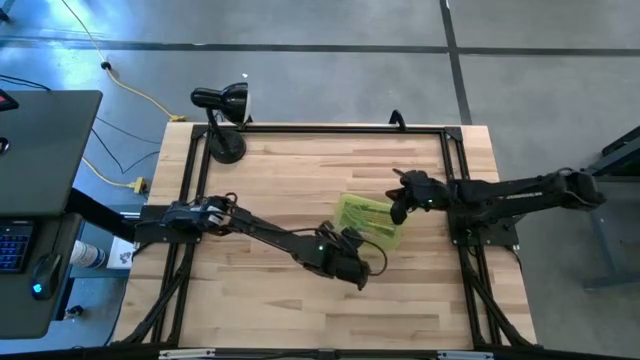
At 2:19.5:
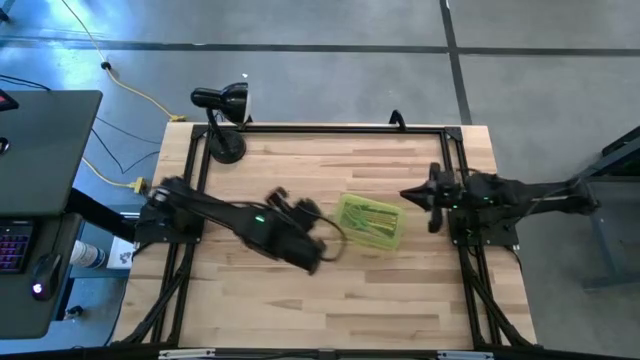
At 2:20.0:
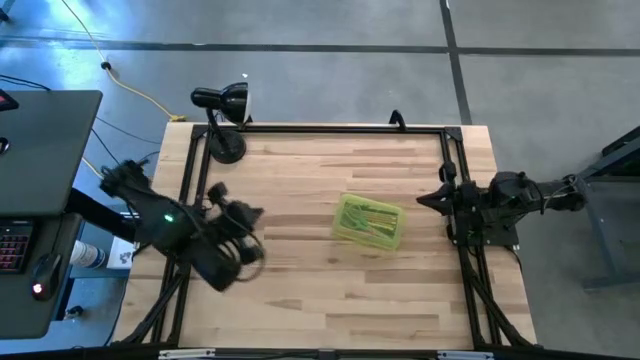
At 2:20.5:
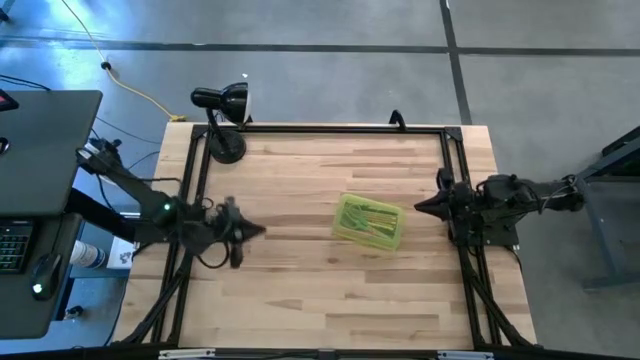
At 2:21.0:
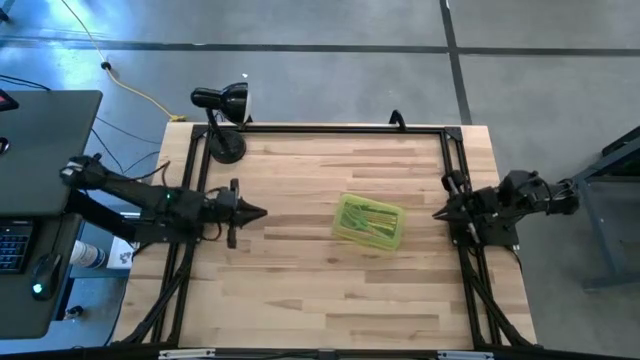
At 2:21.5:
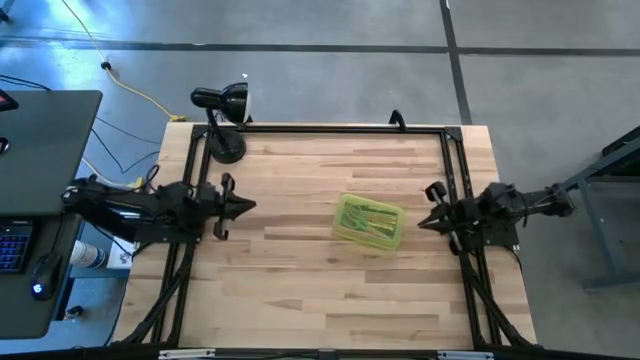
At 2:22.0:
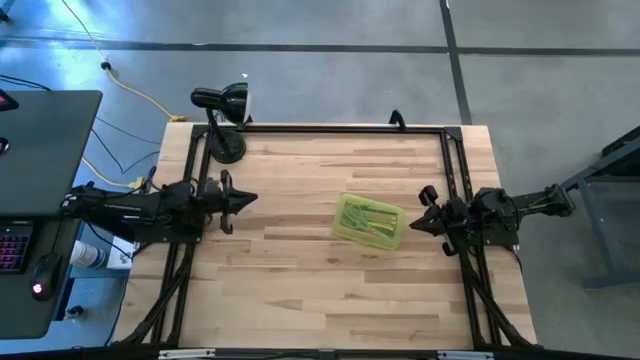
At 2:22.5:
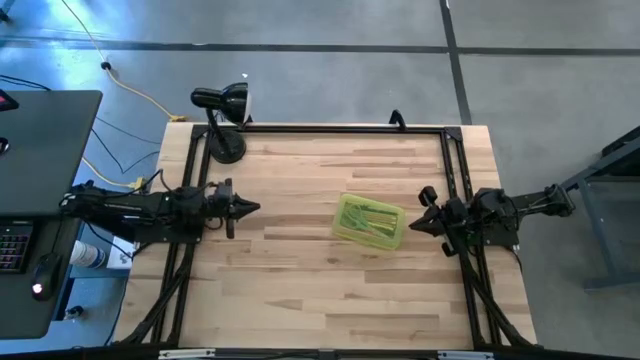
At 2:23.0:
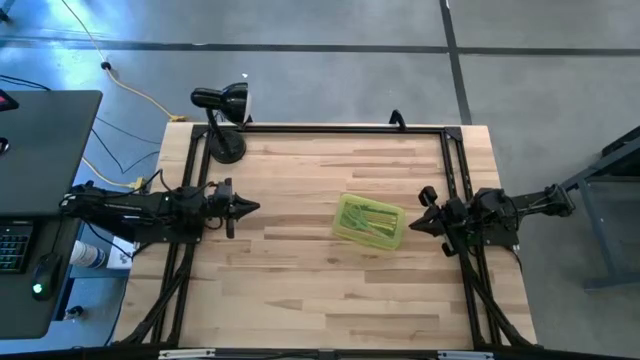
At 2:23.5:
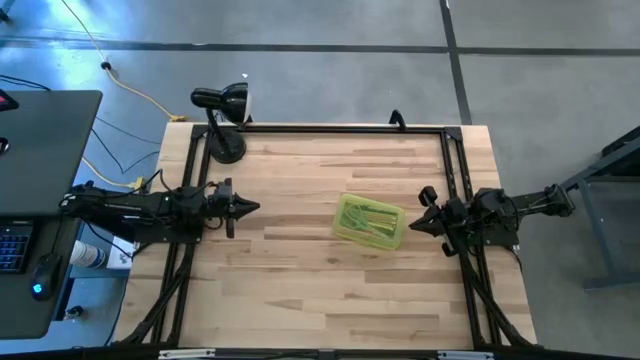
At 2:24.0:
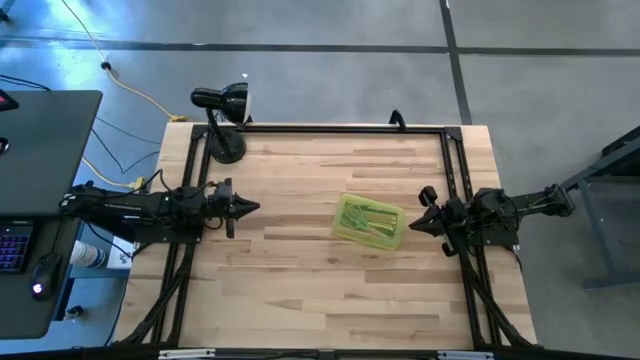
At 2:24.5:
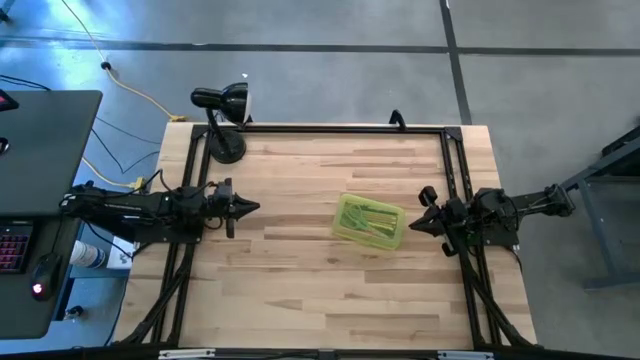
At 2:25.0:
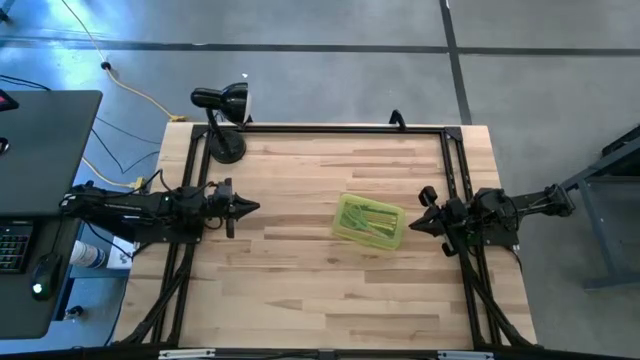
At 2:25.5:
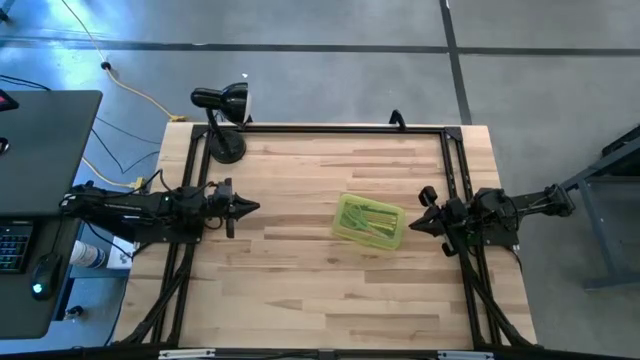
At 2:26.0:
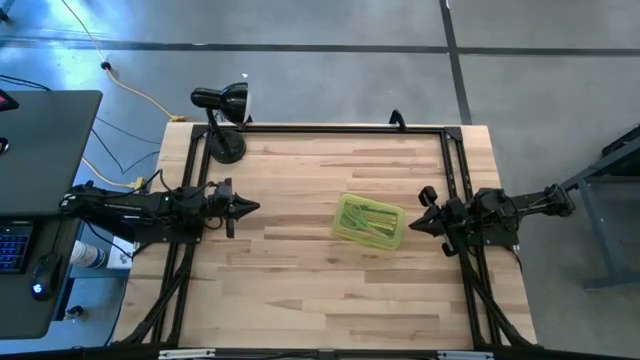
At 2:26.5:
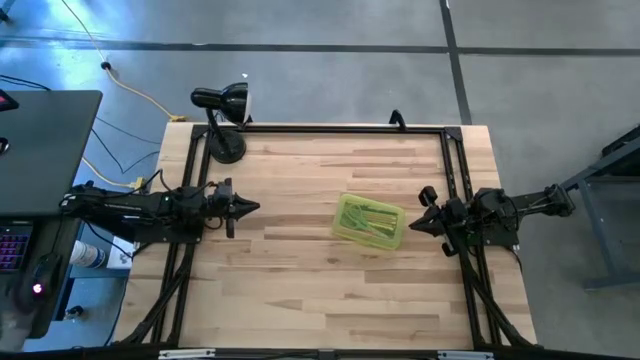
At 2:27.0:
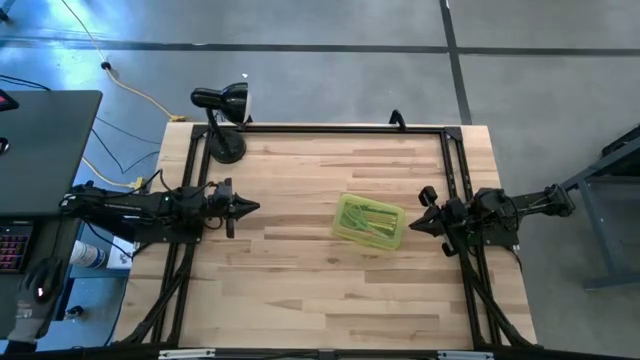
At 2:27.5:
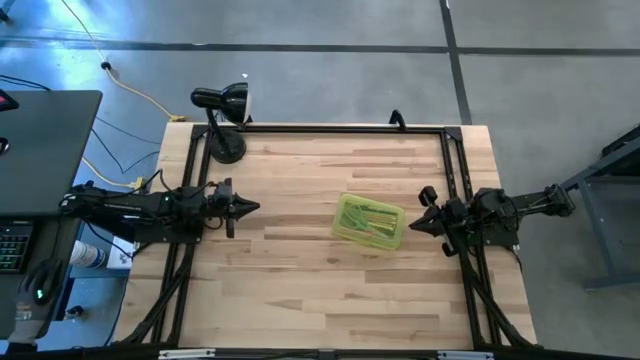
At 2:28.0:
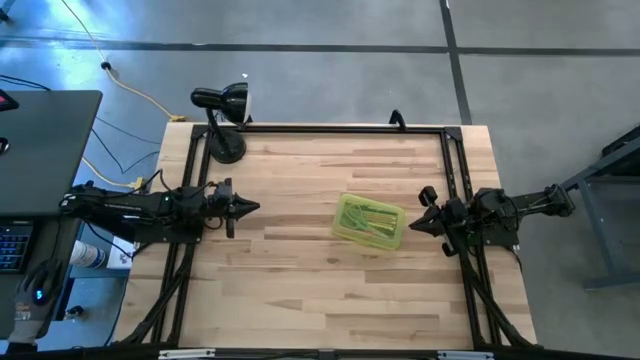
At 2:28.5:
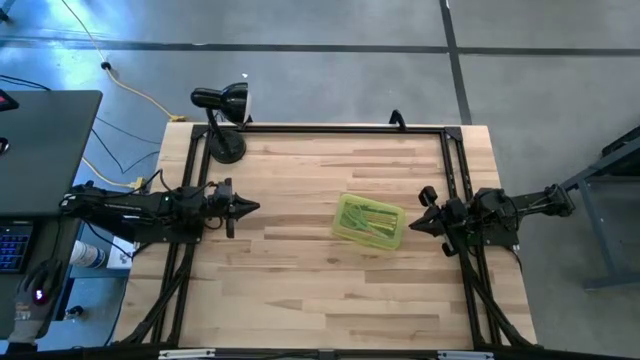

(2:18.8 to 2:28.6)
Task: Pick & place school supplies into a supply box
Return to Home Position

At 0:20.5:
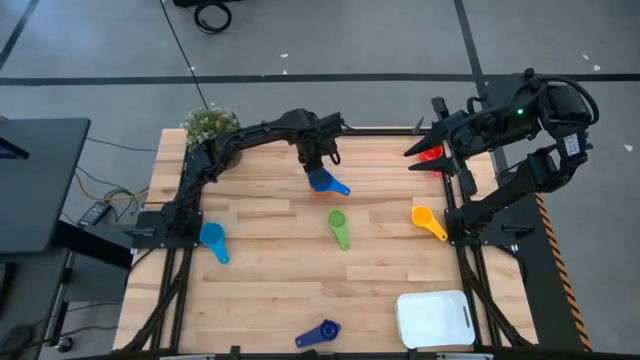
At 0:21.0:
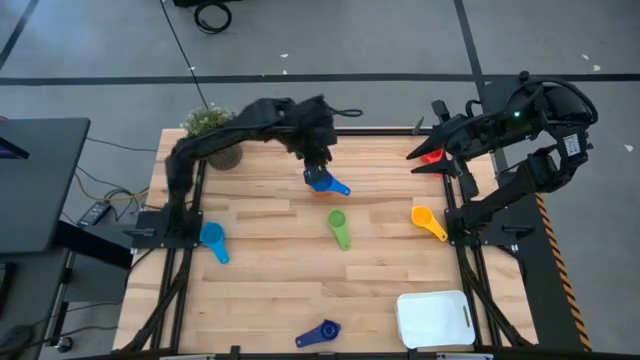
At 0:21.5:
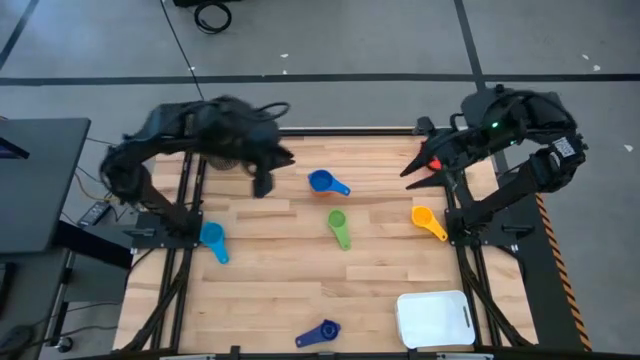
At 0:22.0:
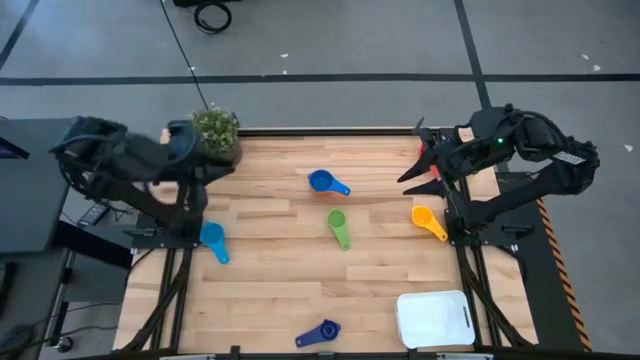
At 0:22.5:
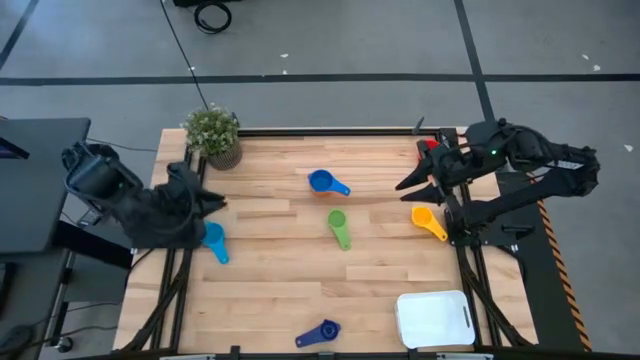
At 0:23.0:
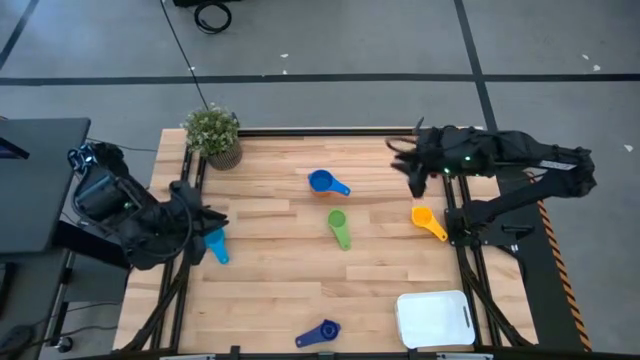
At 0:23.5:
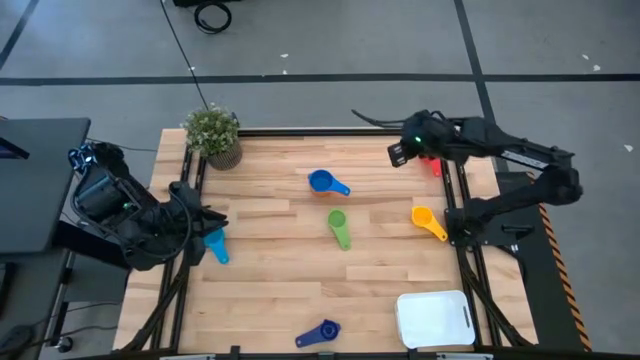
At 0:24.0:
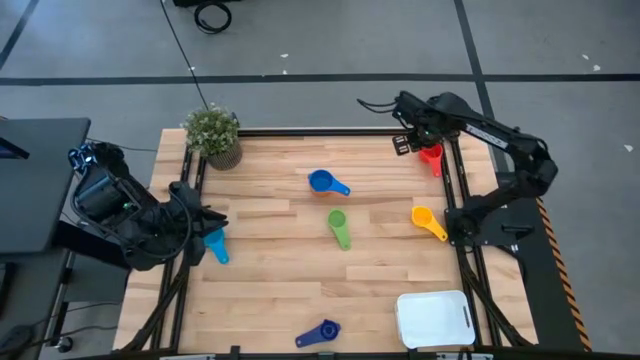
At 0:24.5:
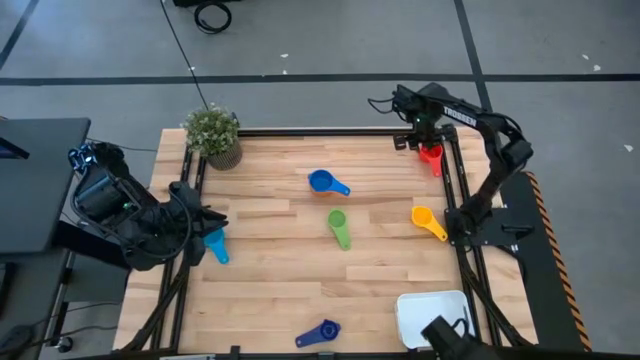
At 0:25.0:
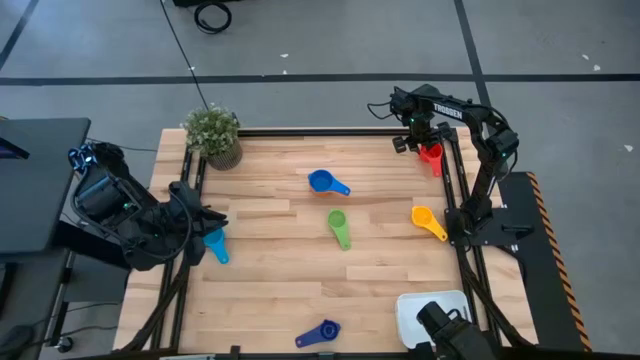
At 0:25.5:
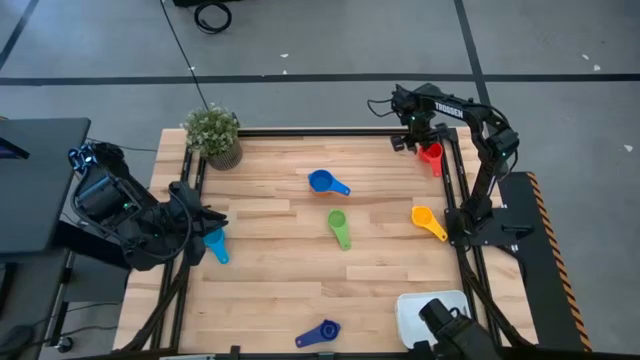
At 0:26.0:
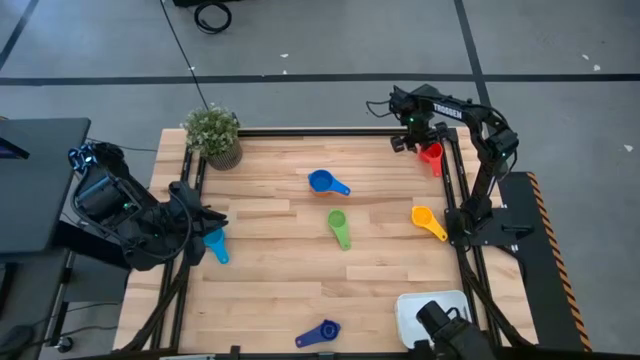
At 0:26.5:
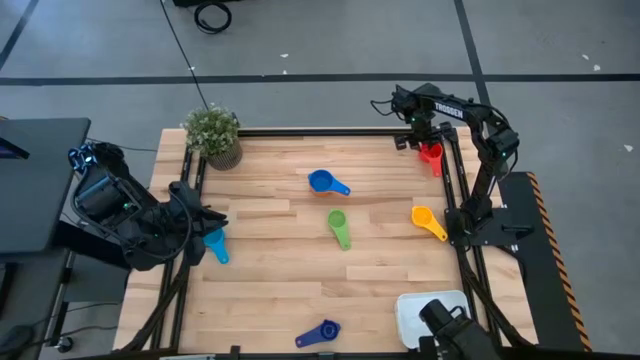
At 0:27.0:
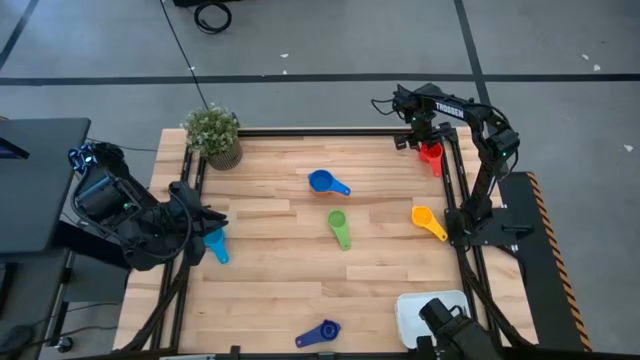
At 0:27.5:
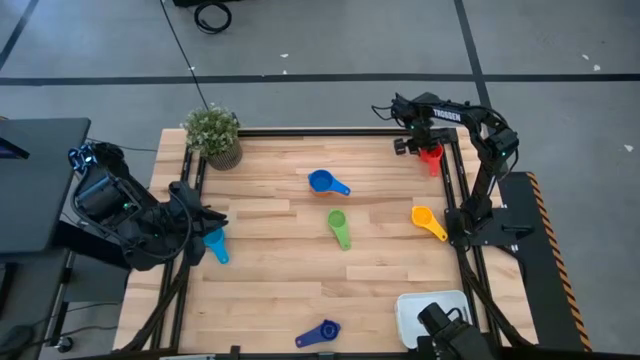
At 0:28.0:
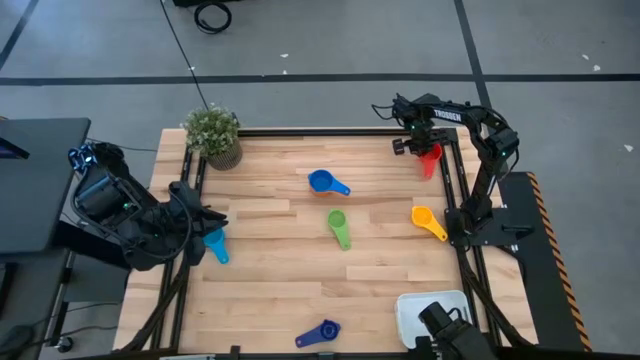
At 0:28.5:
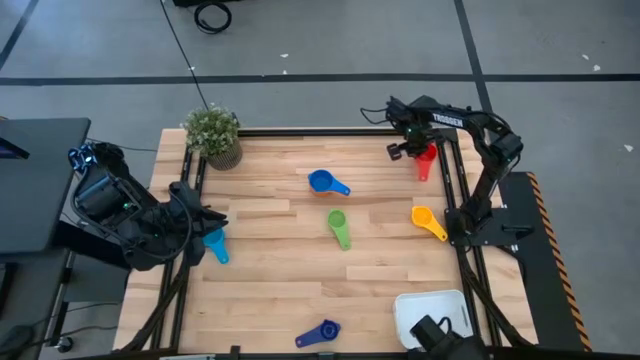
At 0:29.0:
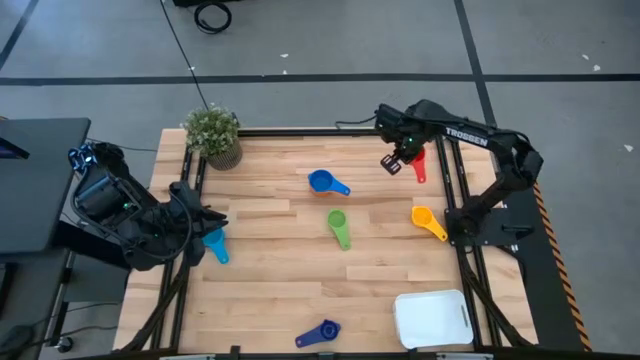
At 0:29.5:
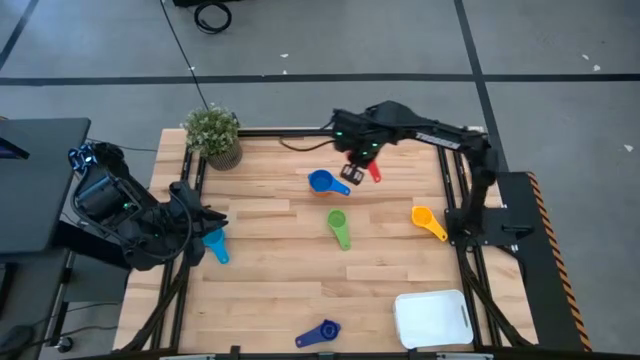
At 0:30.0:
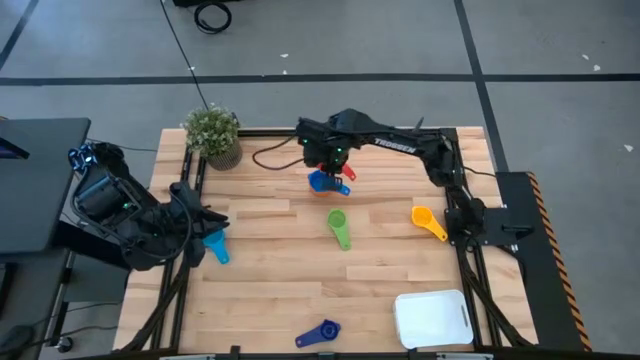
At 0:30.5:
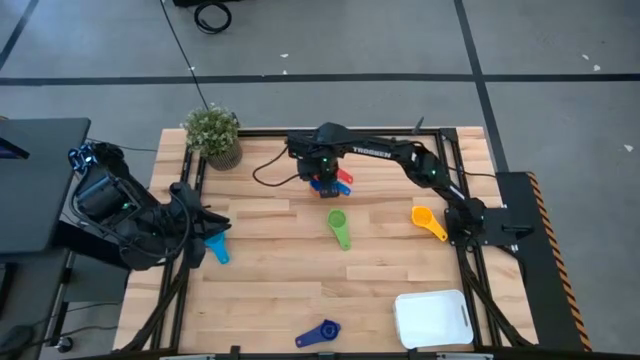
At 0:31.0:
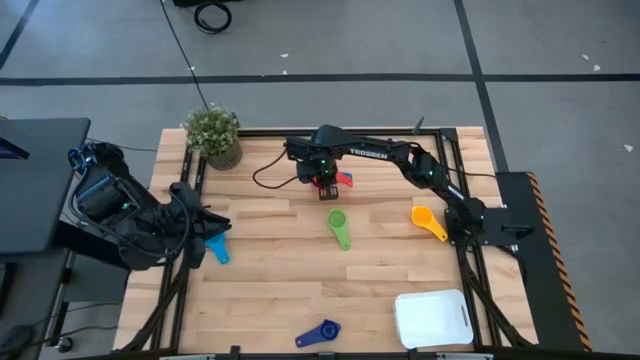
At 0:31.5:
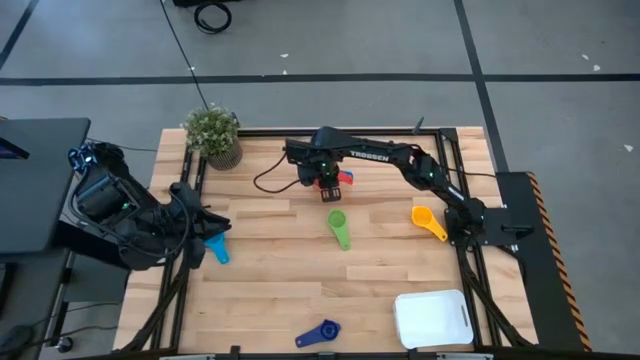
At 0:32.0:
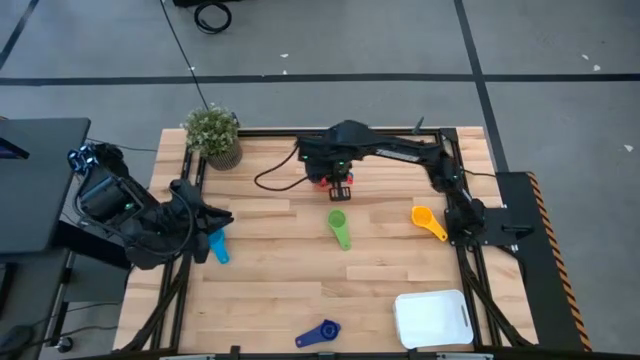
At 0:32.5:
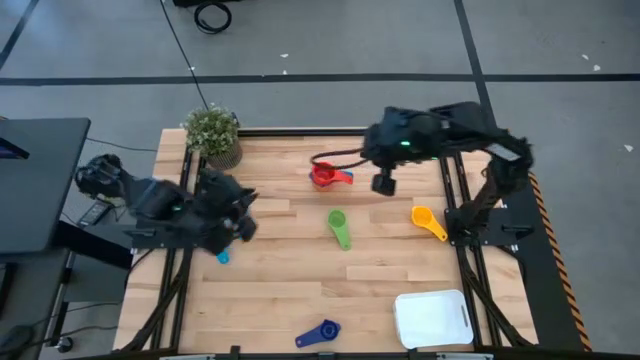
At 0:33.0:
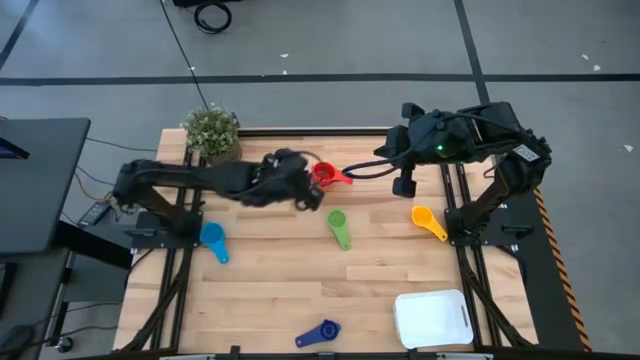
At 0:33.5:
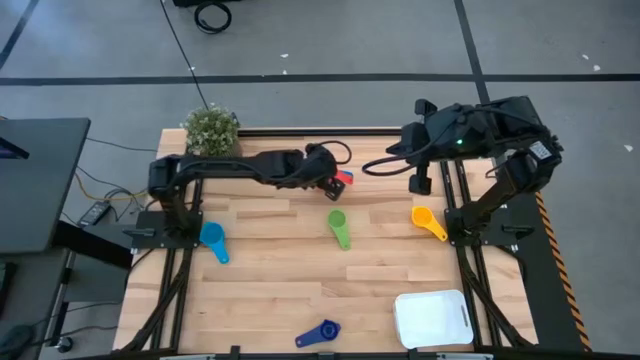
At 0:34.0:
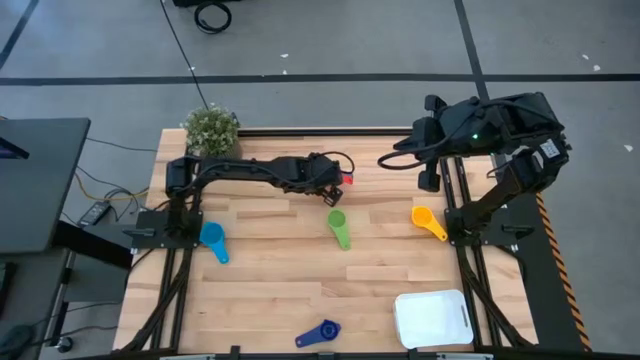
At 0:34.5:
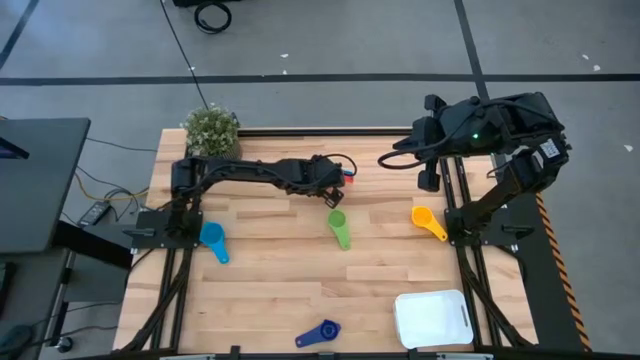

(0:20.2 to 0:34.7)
Task: Nest measuring cups in basket
Stack the red measuring cup on top of the blue measuring cup
